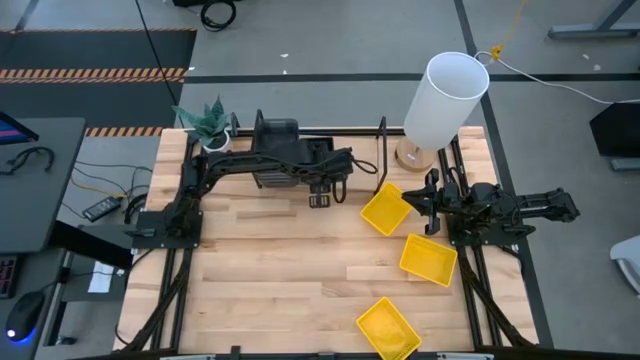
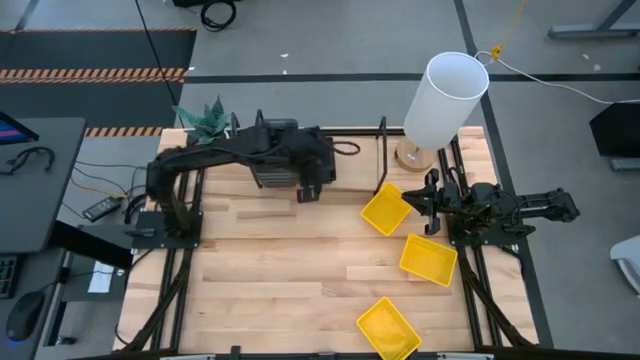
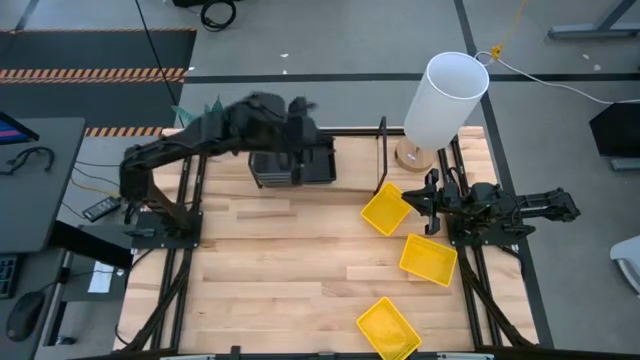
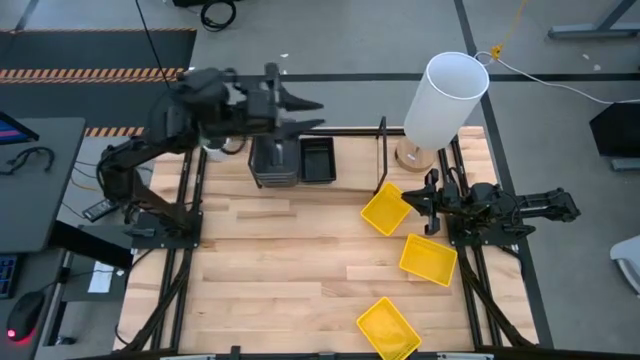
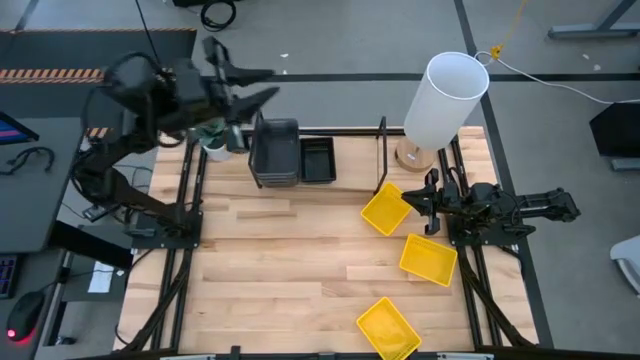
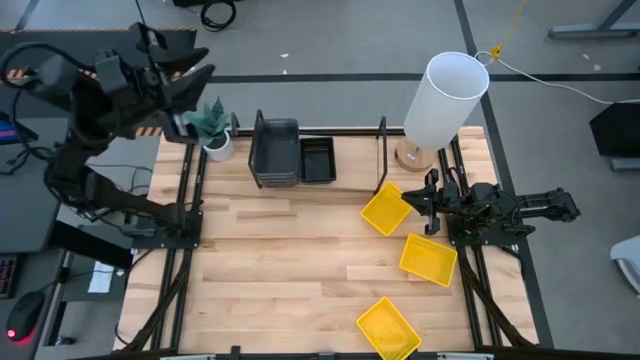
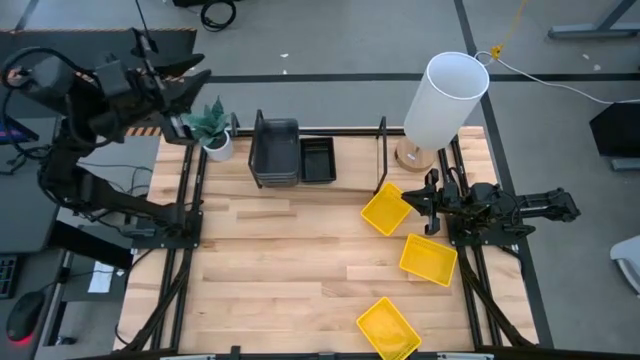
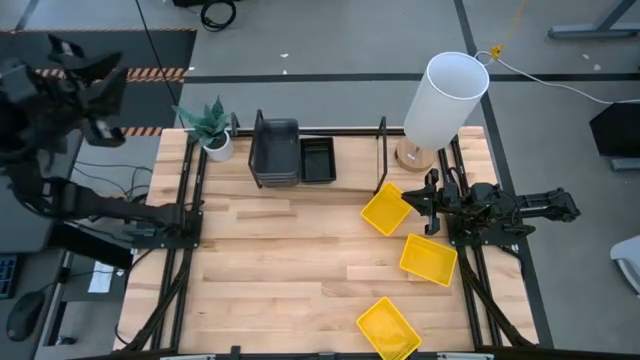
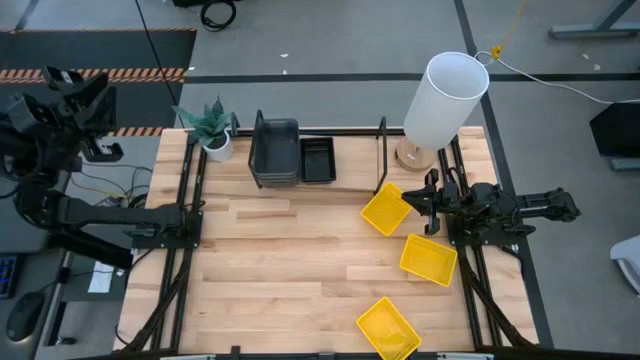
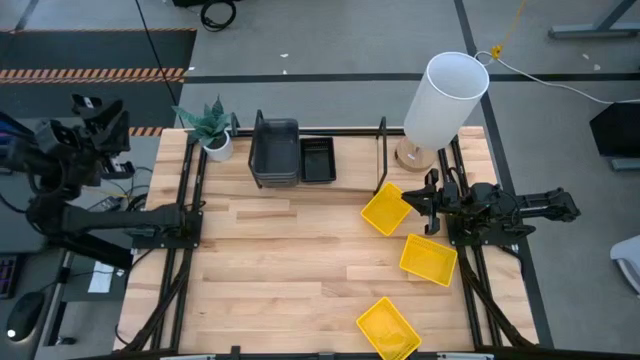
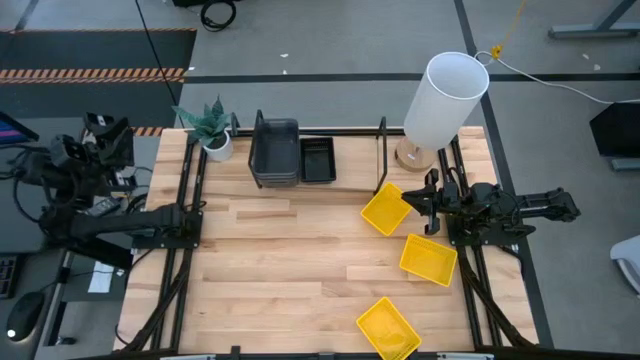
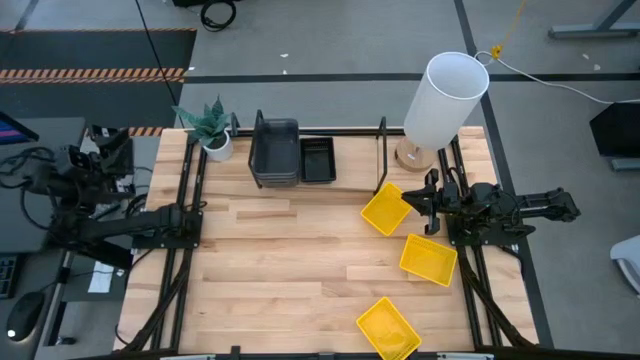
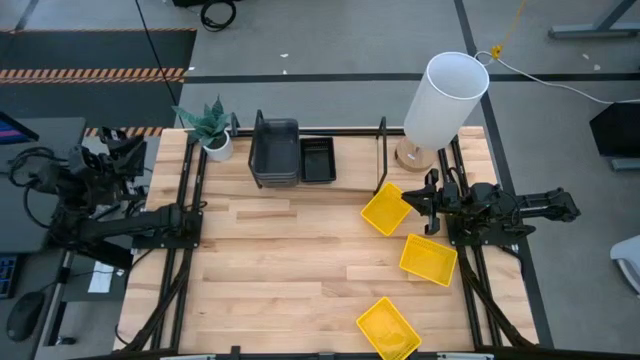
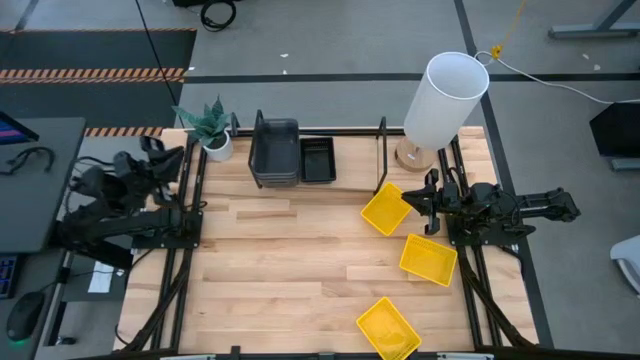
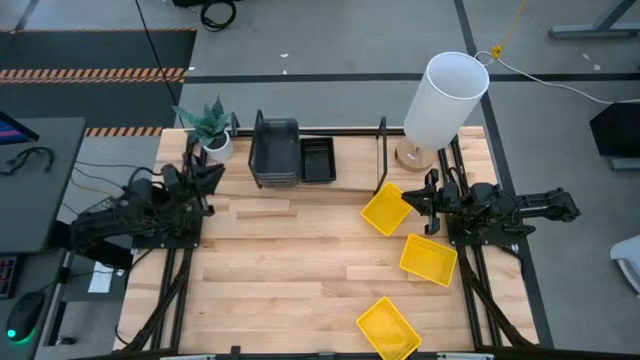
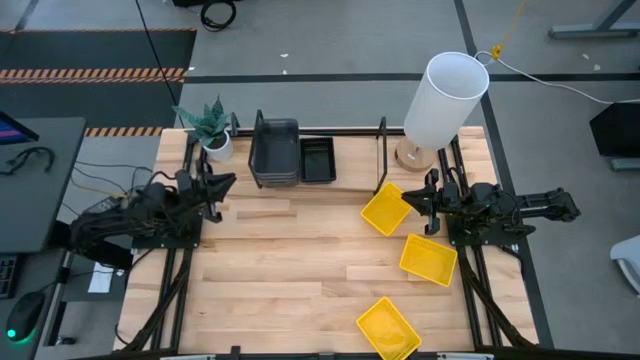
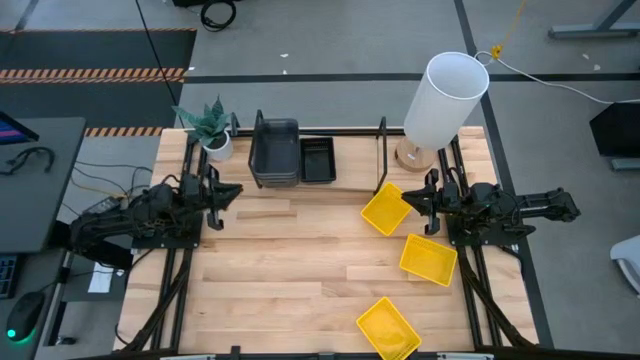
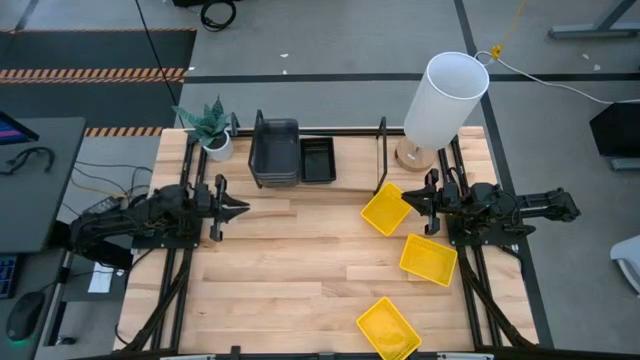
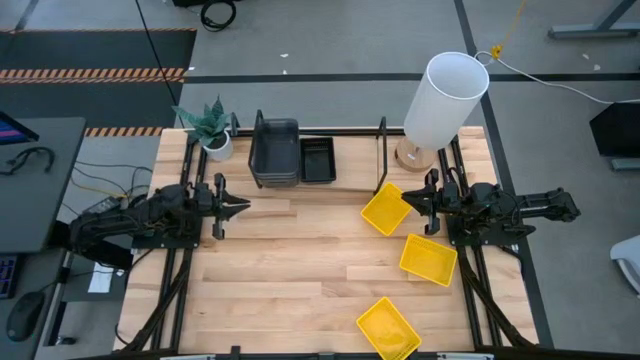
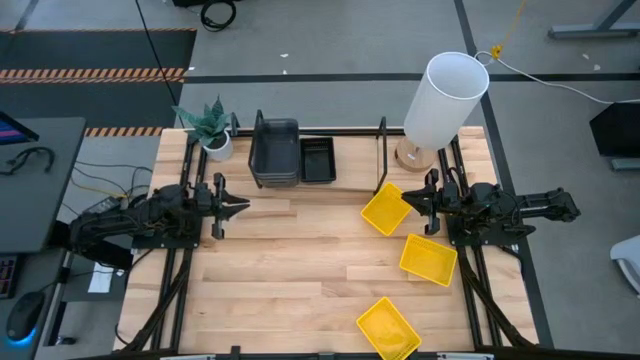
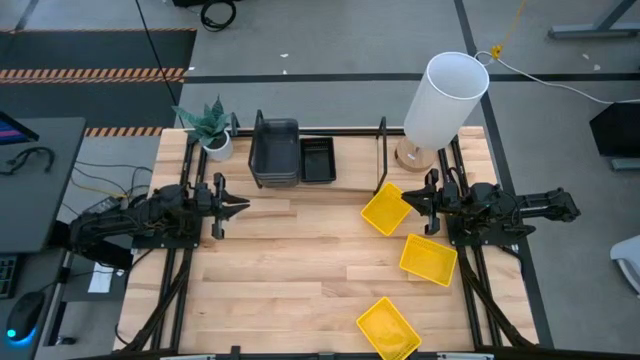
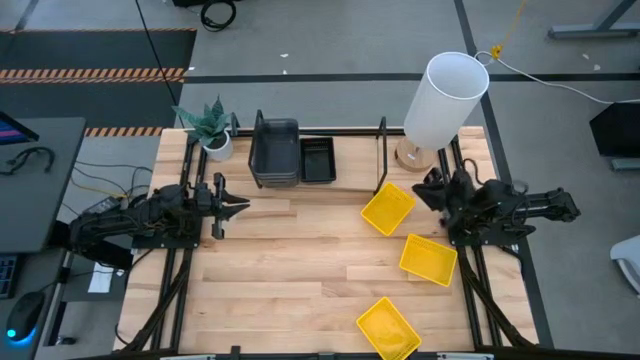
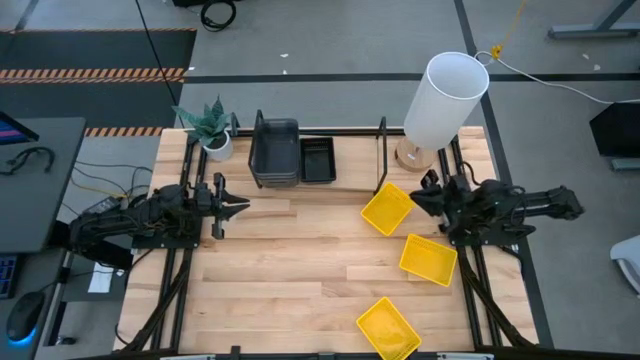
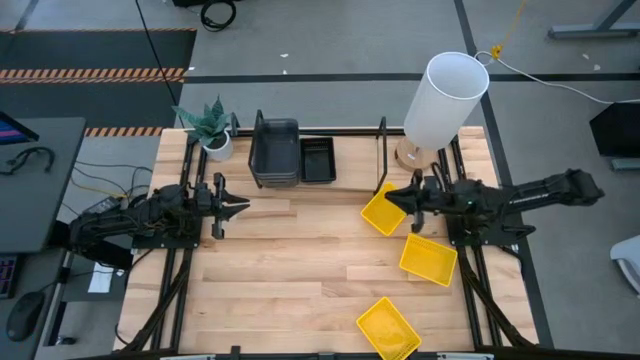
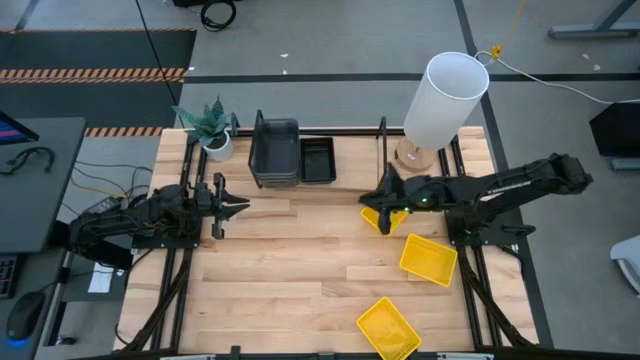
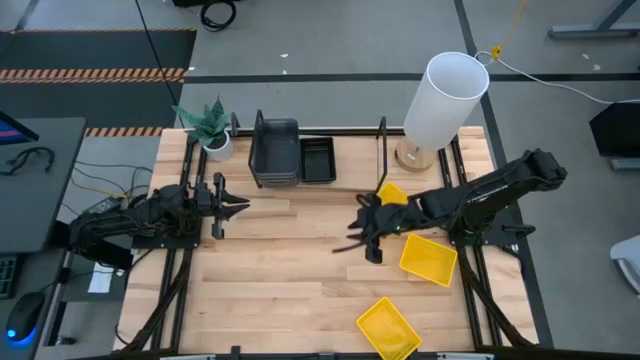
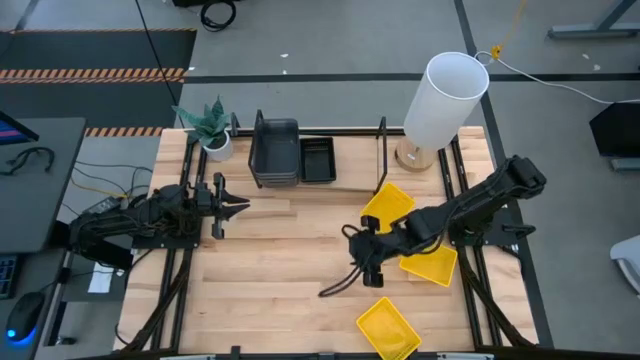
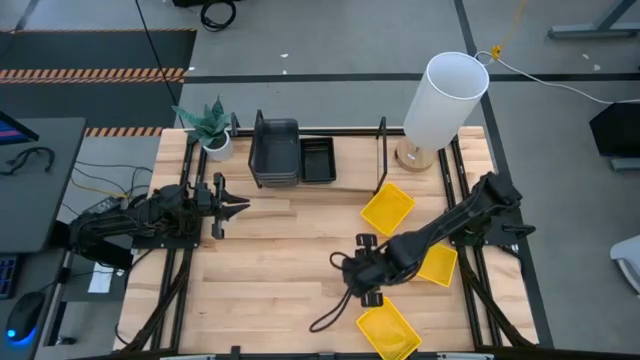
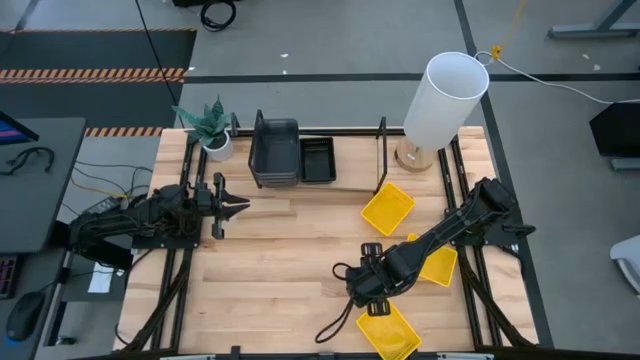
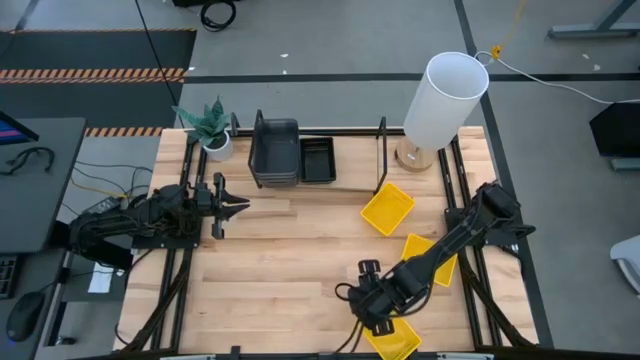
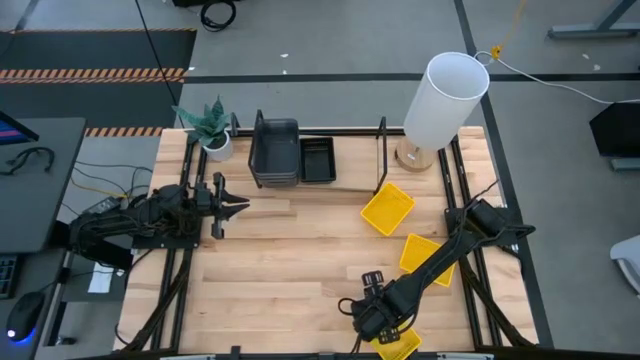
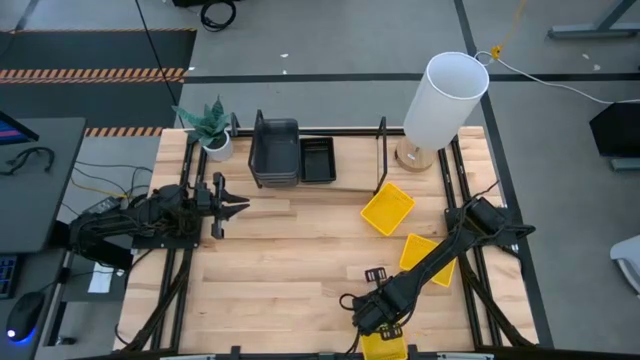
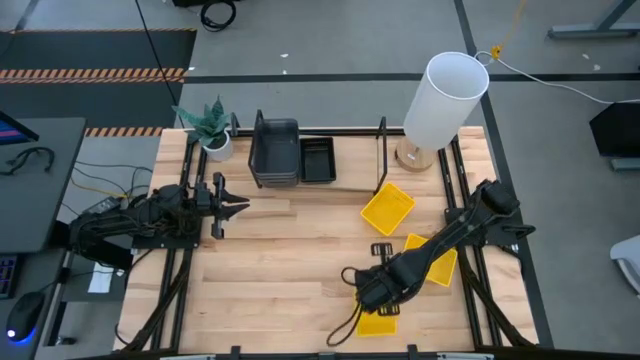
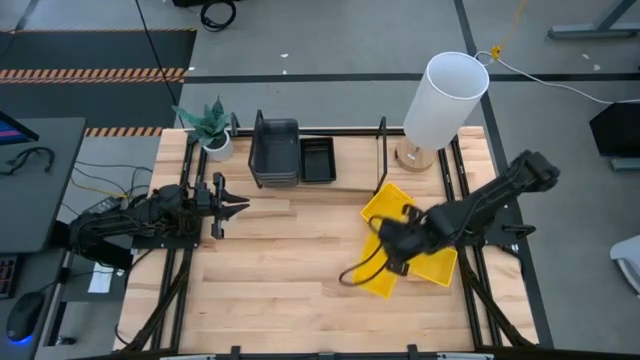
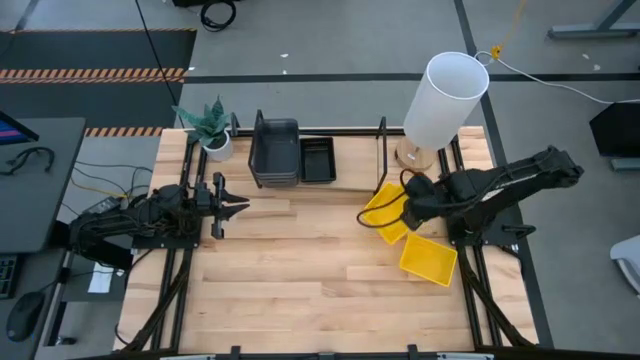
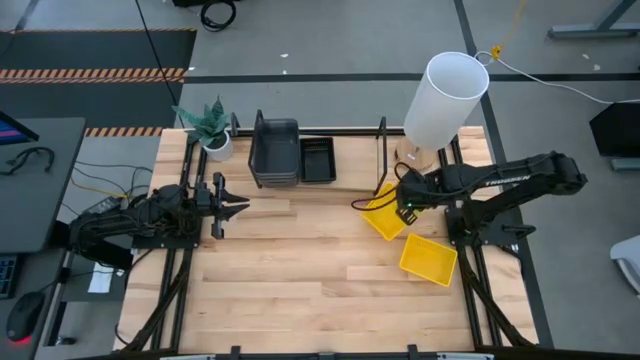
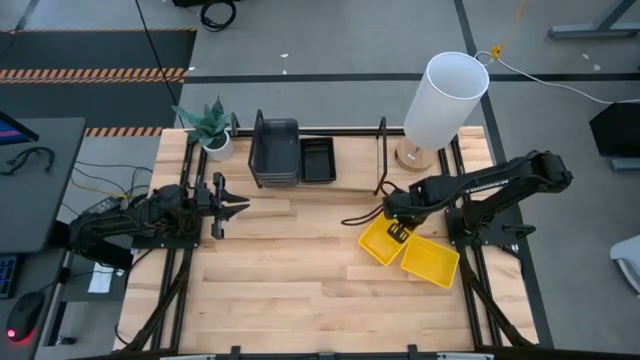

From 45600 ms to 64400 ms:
Task: Stack baskets on shelf by color
Stack the bottom yellow basket on the top yellow basket

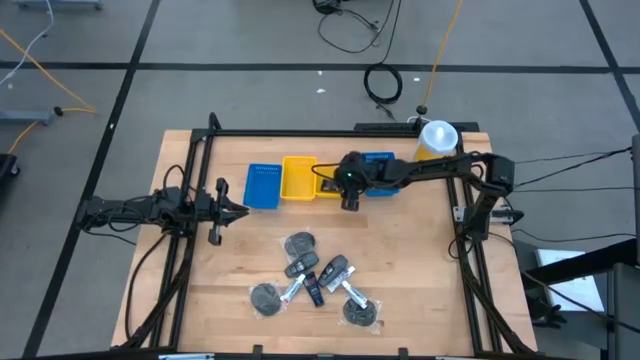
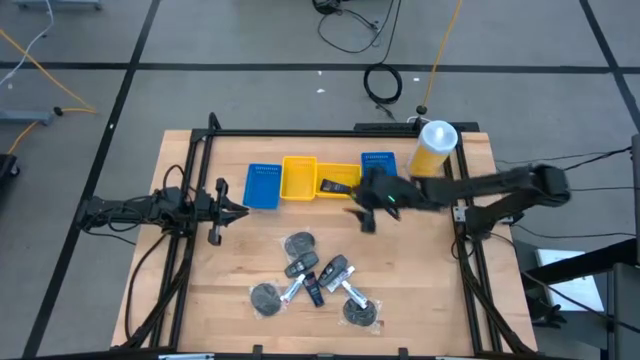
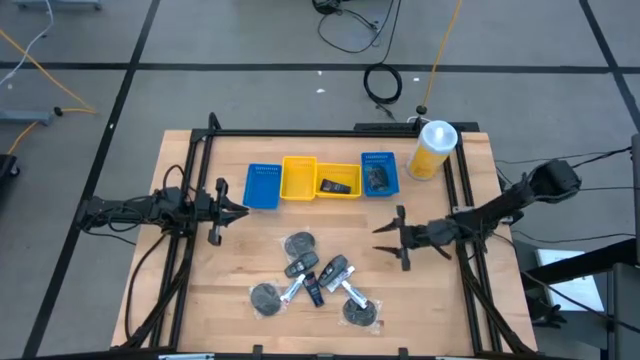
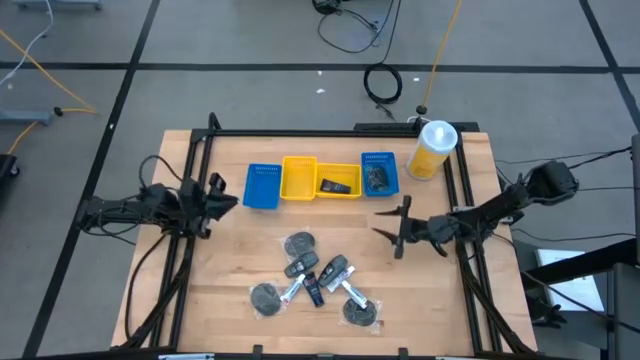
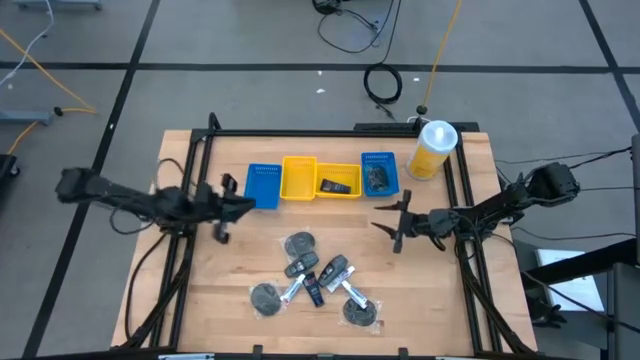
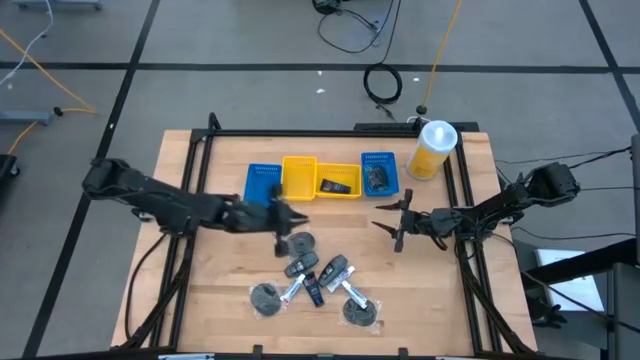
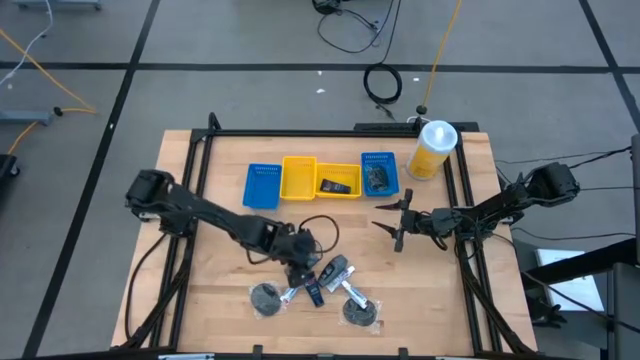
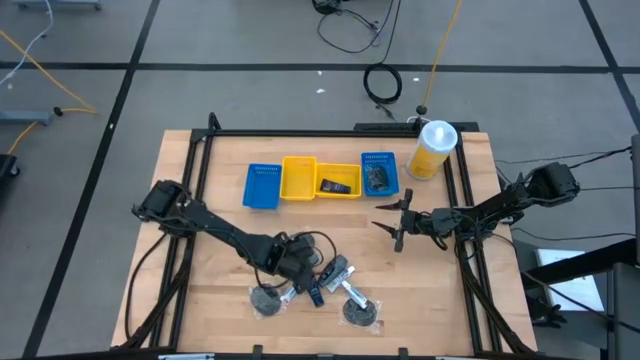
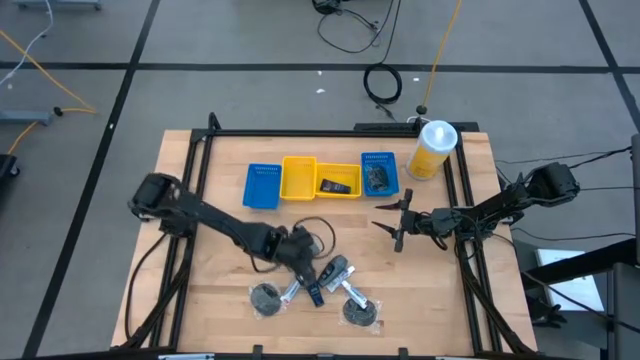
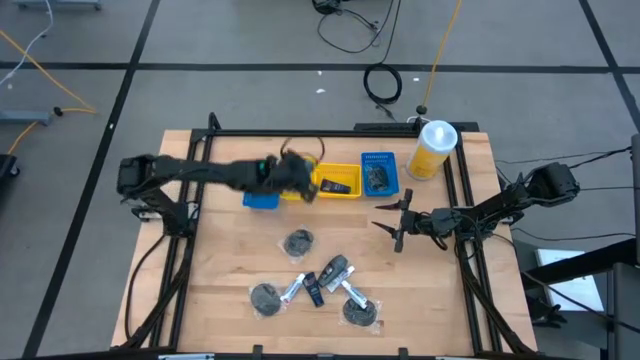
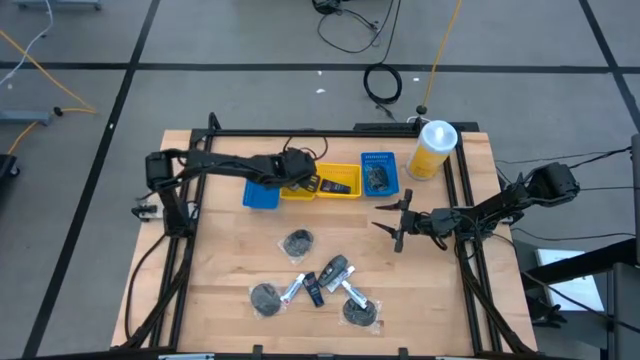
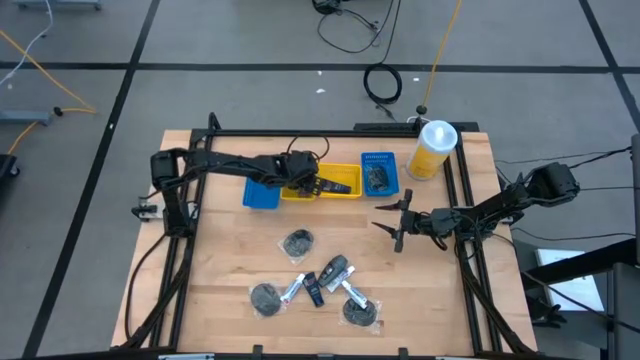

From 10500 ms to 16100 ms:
Task: Pick & Place Travel size toiletries
Put the deodorant into the left yellow basket
